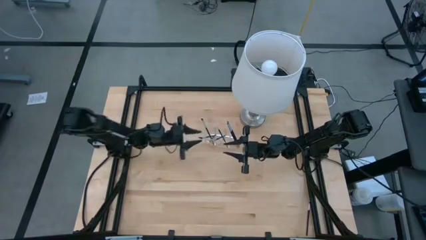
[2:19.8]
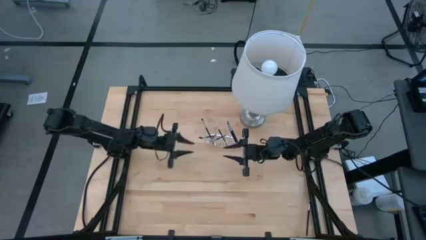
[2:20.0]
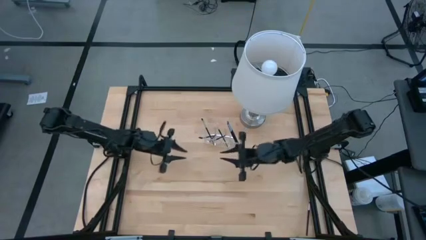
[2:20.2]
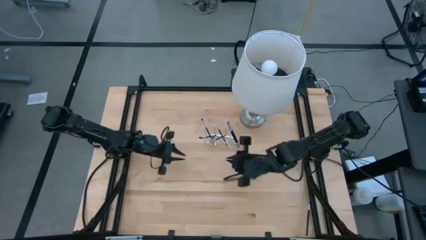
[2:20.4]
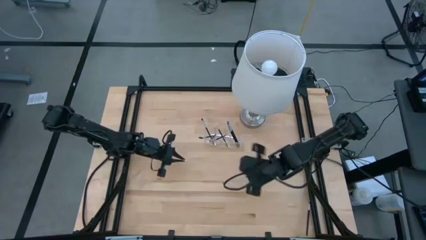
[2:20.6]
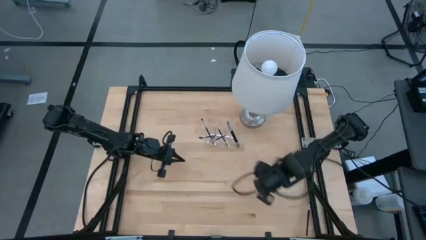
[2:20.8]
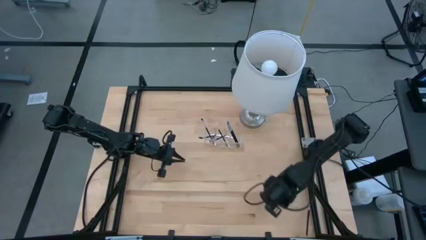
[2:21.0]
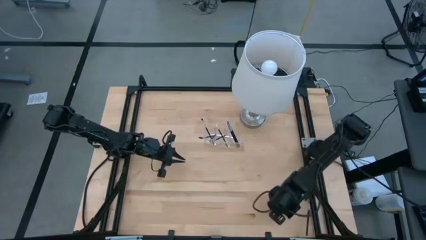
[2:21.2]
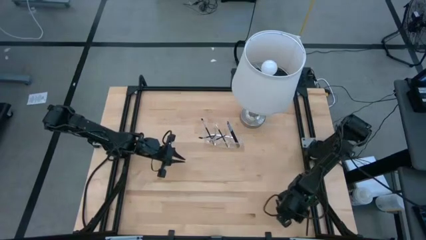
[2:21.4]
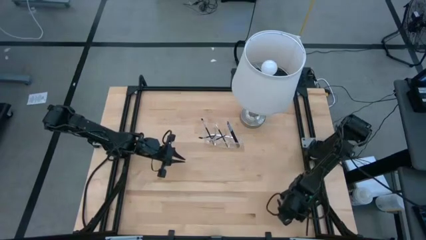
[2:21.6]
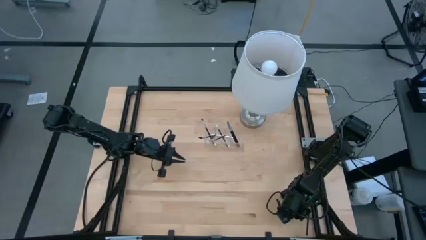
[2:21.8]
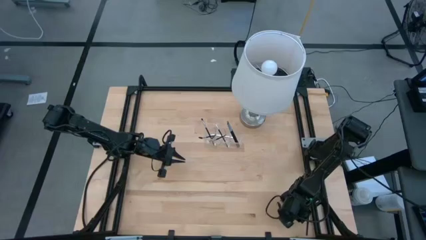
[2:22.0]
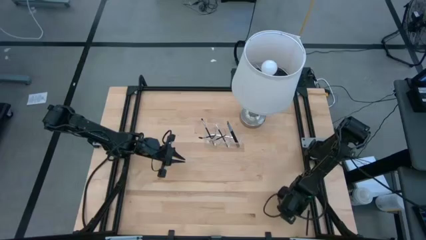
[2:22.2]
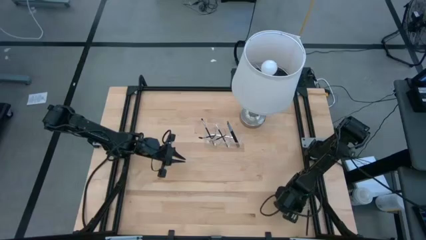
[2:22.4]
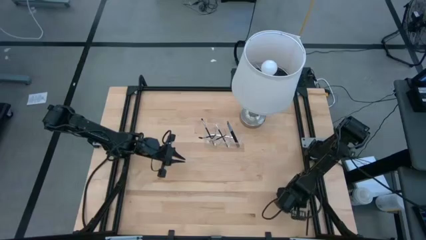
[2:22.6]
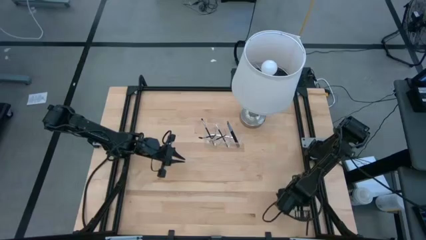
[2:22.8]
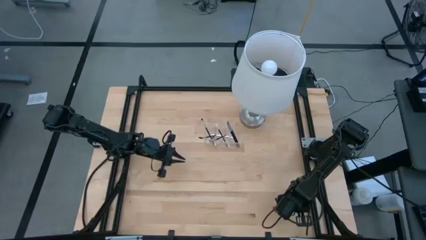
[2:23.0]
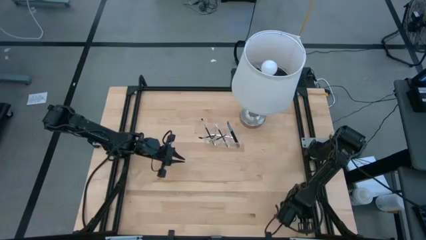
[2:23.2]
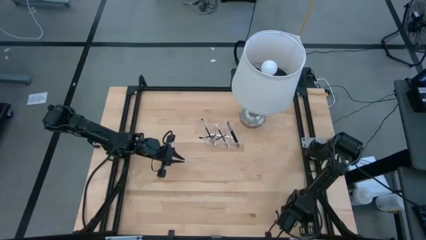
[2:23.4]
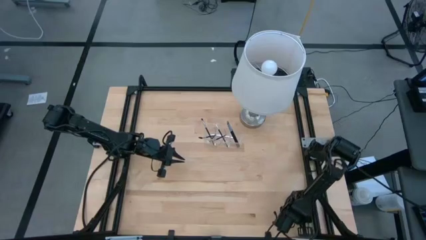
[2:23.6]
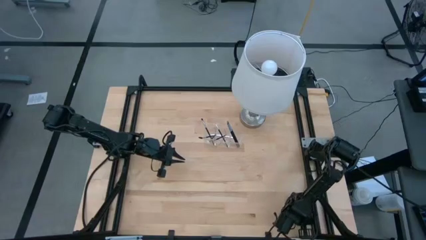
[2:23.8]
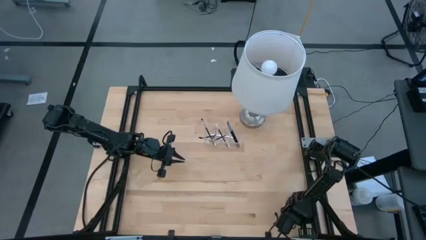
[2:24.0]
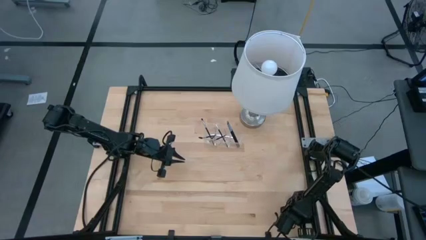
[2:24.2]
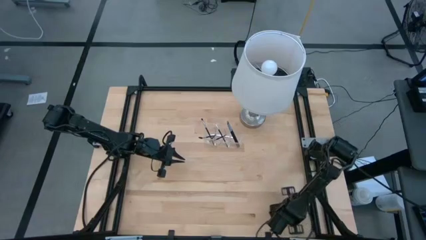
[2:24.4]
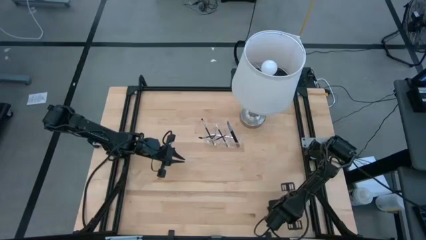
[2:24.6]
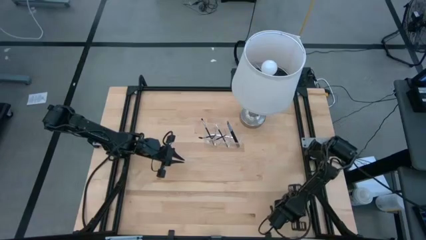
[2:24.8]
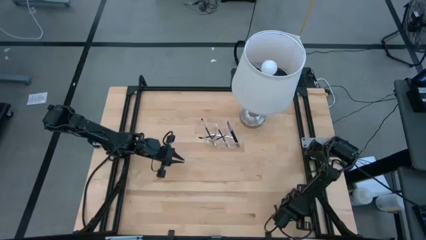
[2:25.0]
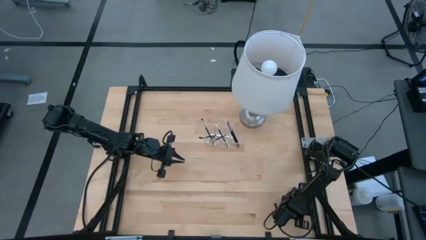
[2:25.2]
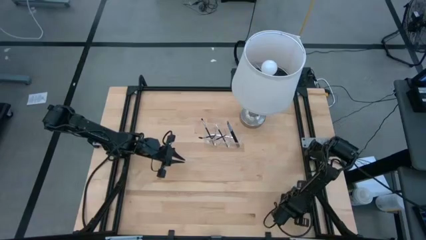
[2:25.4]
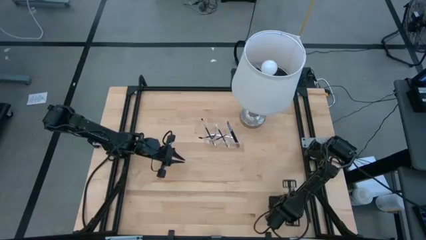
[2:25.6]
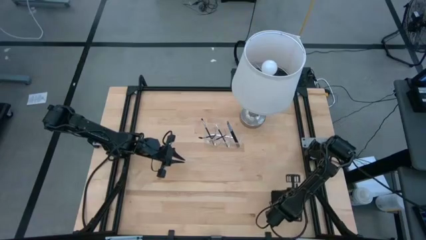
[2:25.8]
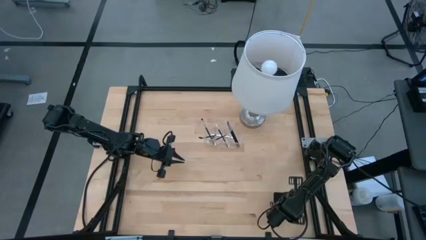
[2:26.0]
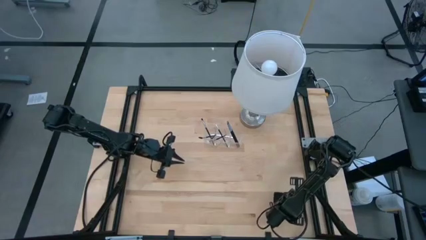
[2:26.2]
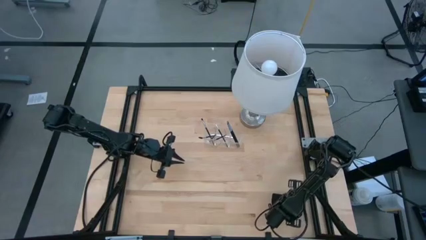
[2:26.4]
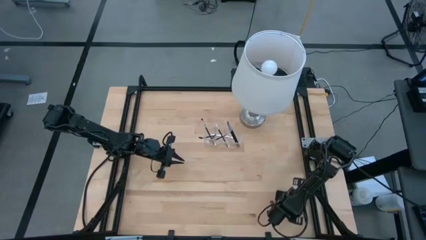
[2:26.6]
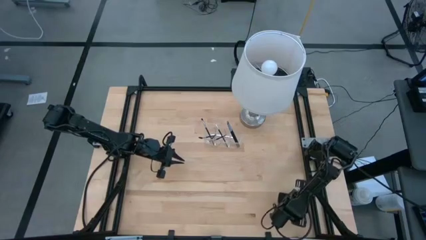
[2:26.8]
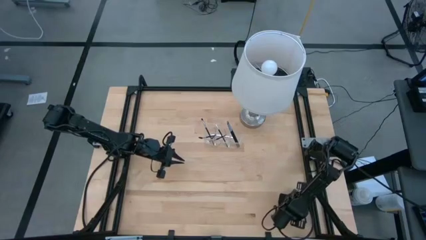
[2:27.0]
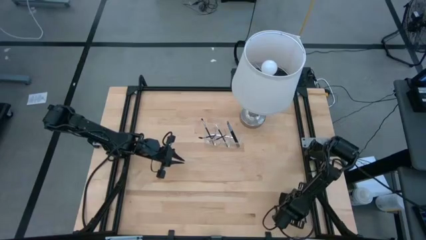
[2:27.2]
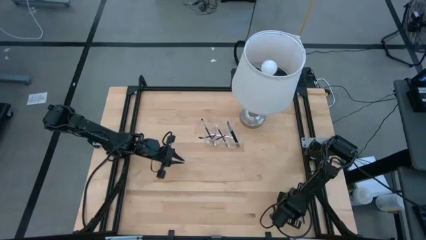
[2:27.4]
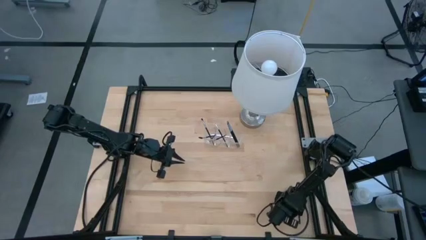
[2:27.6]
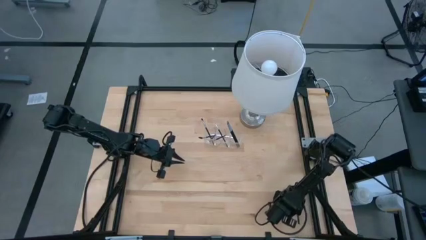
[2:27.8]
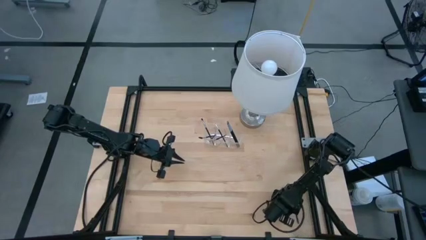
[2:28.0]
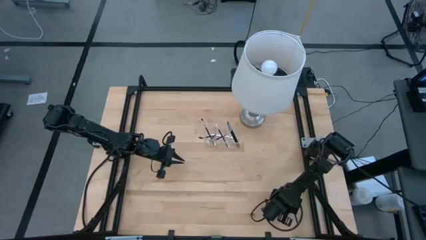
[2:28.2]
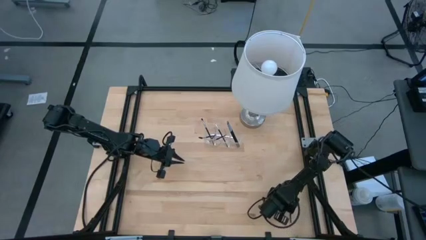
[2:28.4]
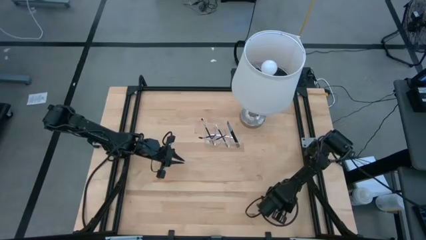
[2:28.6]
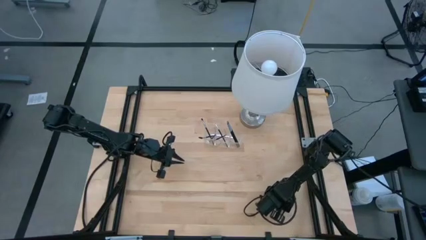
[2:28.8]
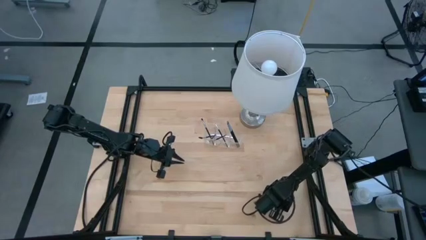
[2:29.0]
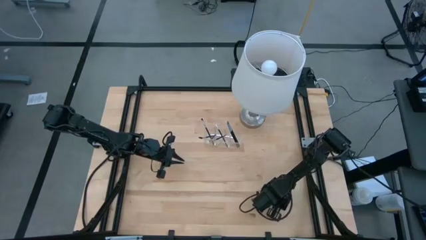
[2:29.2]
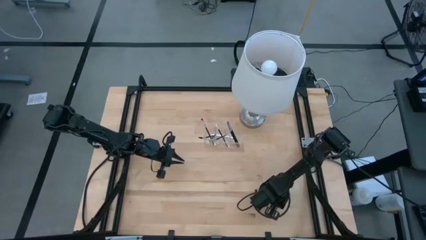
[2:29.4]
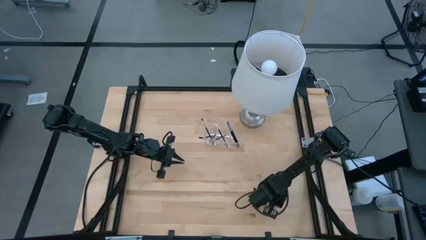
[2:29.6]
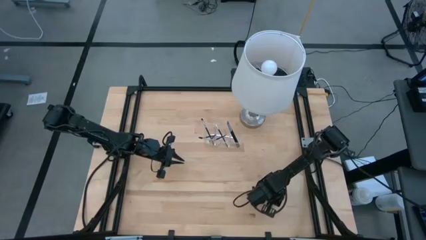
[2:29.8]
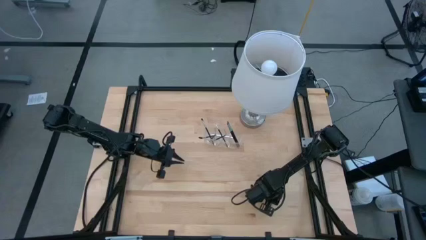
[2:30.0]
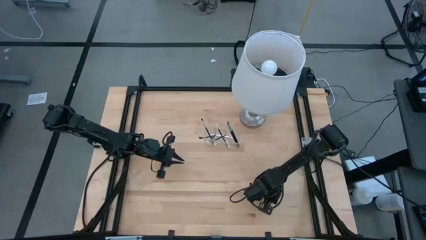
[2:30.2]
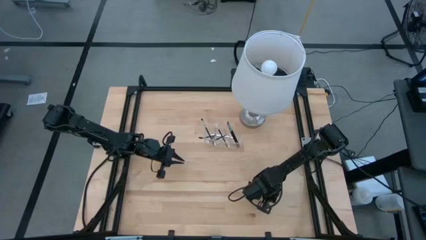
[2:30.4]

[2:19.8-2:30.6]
Task: Pick & Place Makeup Brushes
Put the black eyeshadow brush into the transparent organizer

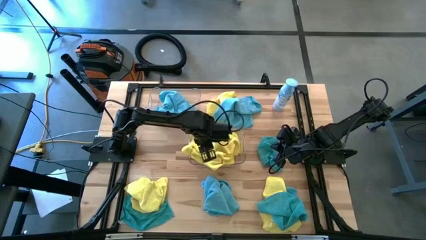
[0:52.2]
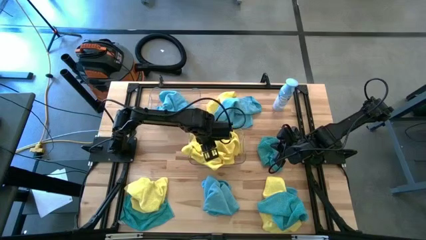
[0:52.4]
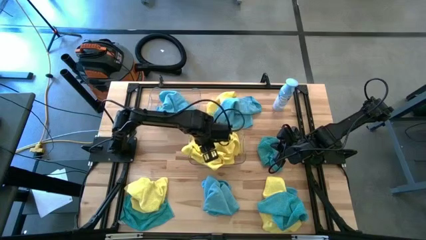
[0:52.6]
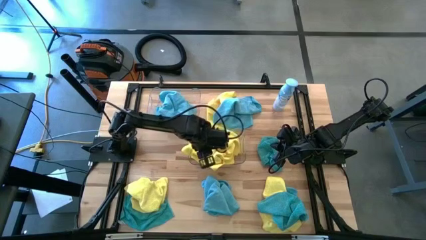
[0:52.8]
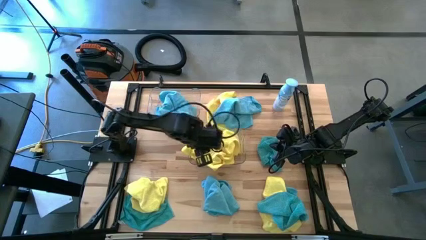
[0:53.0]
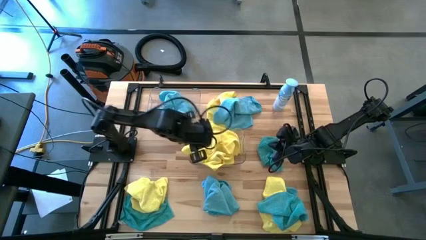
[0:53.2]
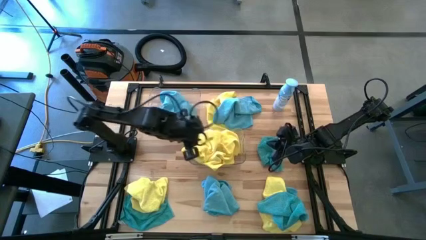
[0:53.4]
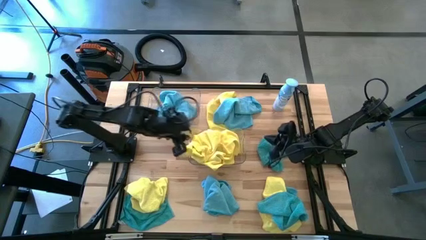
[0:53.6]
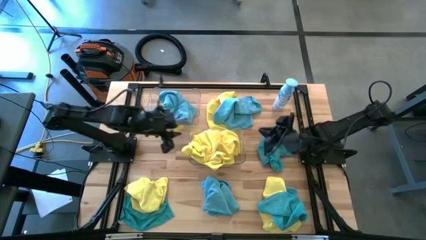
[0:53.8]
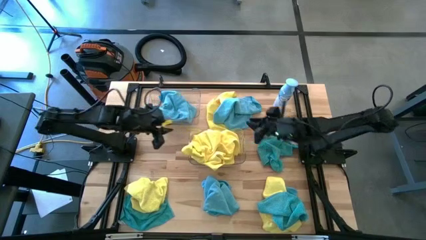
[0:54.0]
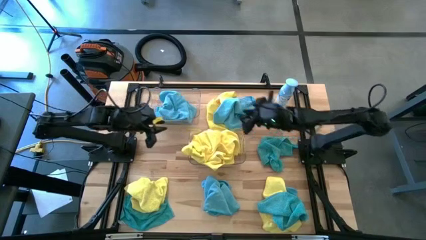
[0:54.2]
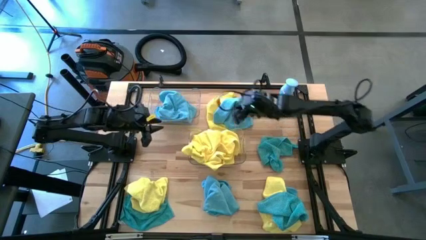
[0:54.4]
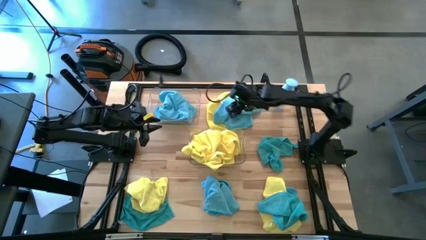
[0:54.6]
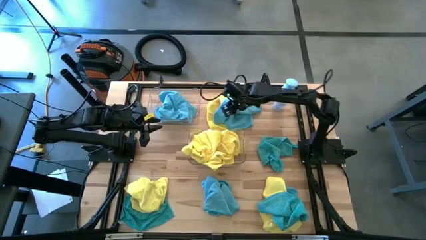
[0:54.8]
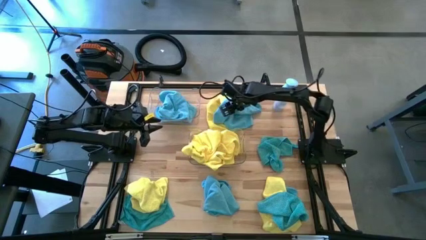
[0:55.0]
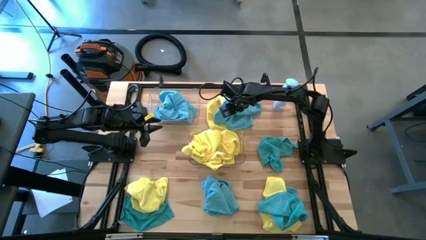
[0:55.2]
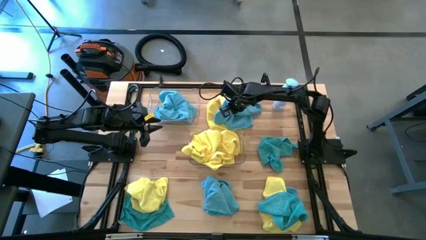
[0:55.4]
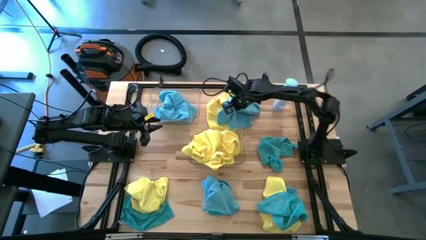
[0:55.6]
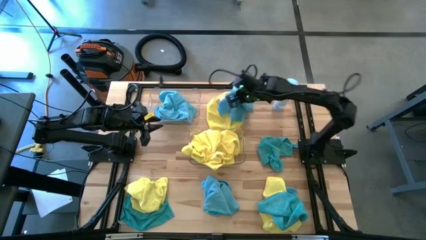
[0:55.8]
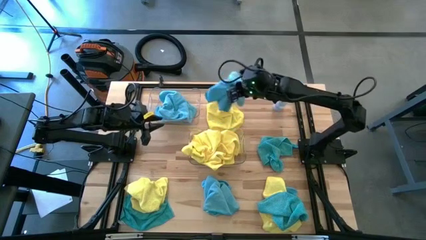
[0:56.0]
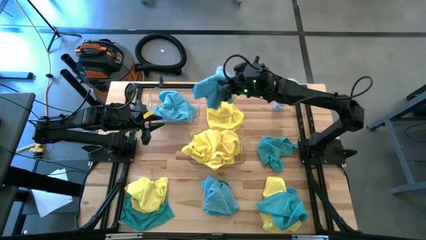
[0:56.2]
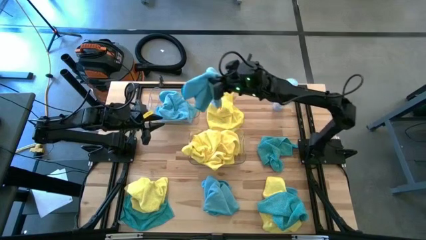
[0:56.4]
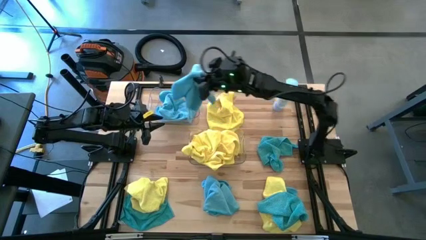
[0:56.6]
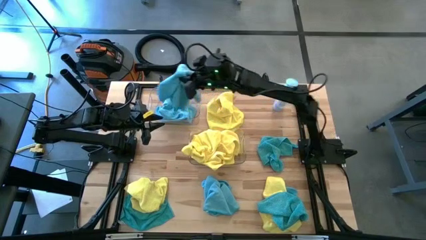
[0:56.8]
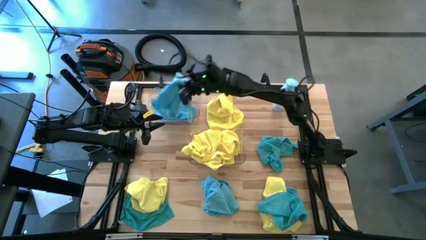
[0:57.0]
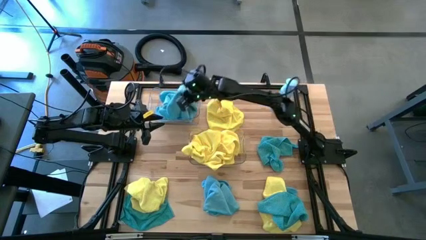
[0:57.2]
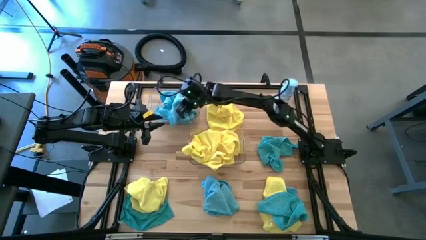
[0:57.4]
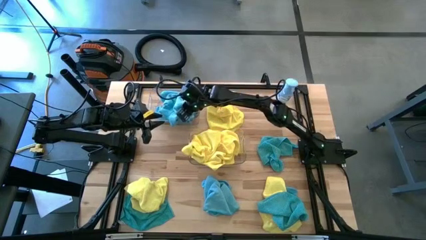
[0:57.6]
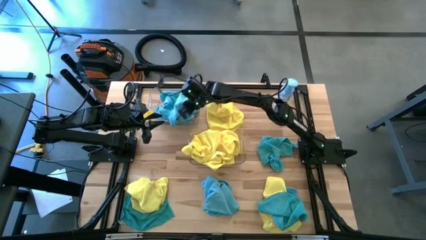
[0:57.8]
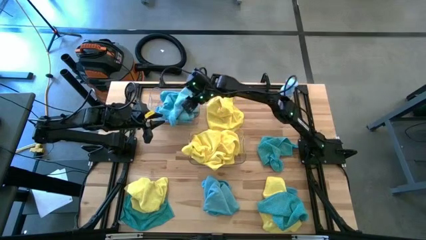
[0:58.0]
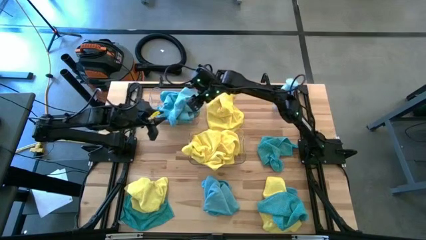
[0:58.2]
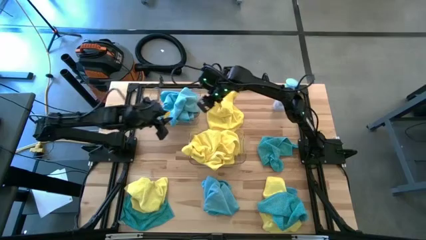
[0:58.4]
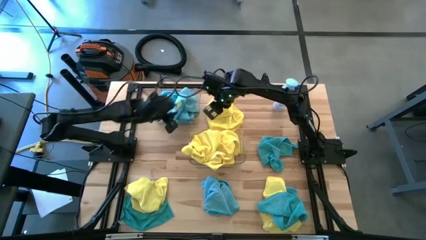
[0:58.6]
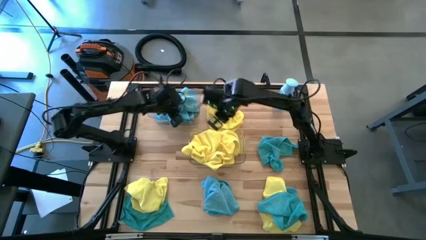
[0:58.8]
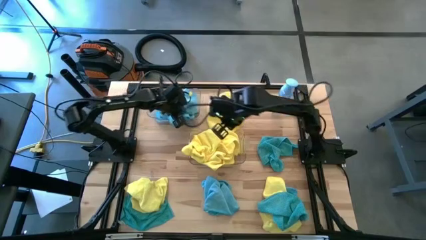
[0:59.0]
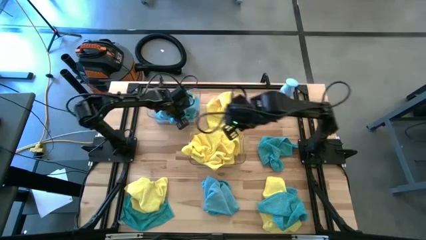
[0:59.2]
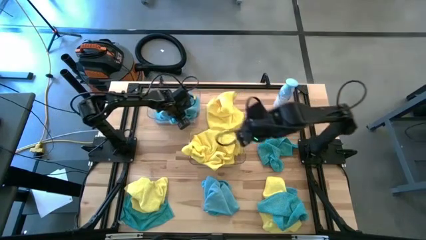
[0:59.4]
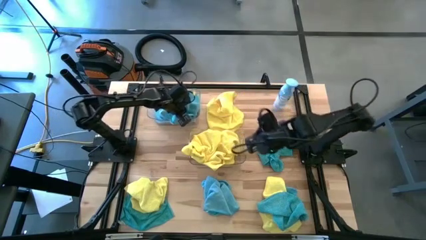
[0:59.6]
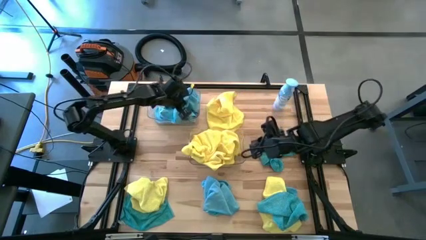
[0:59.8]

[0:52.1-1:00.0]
Task: Sort microfiber towel by color & place in baskets
Put the blue towel into the top transparent bin
